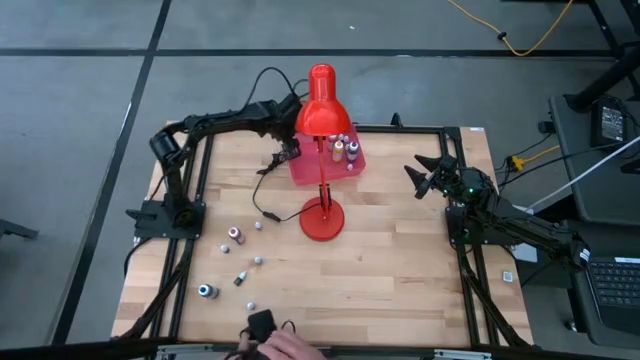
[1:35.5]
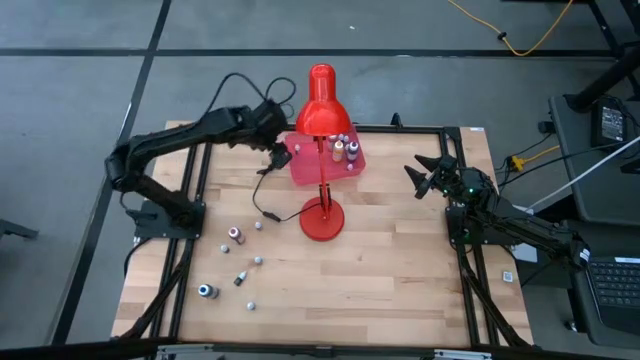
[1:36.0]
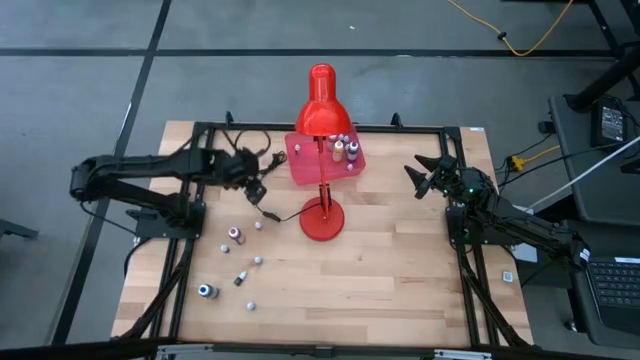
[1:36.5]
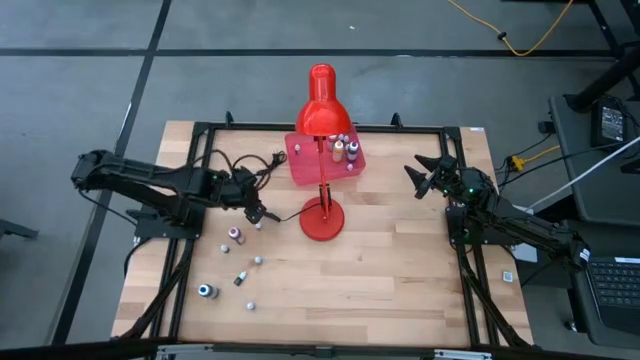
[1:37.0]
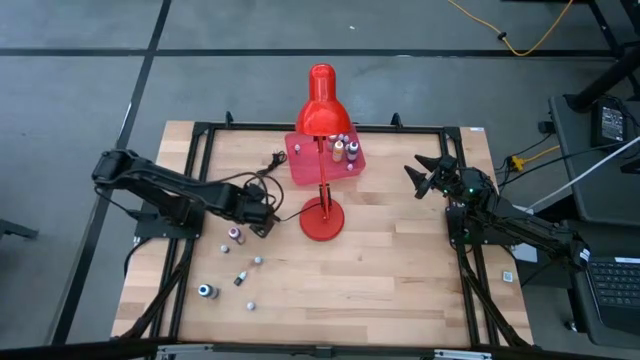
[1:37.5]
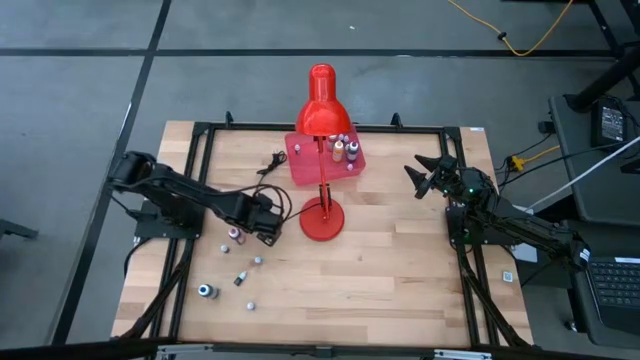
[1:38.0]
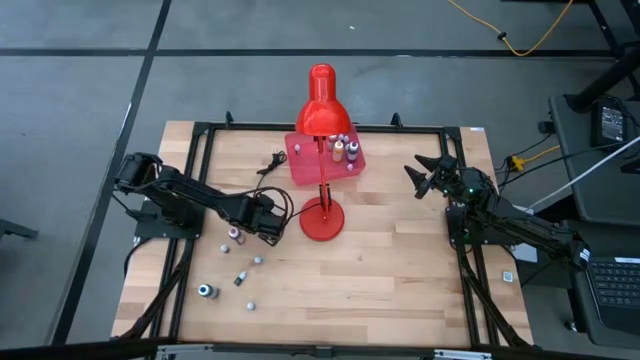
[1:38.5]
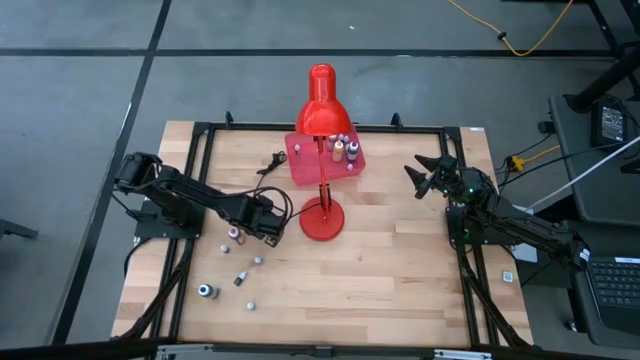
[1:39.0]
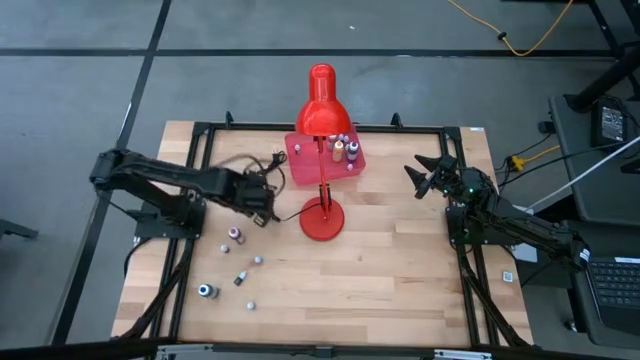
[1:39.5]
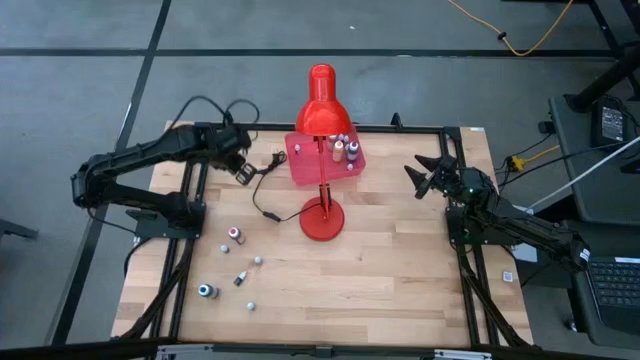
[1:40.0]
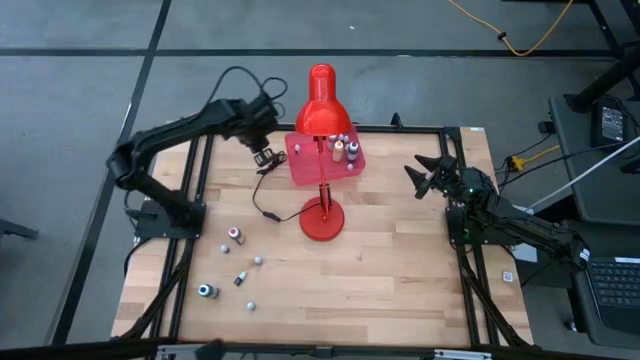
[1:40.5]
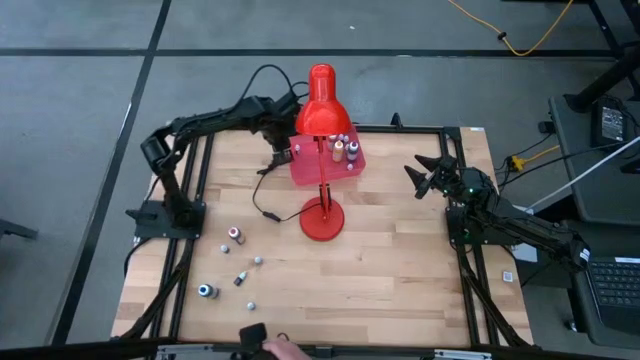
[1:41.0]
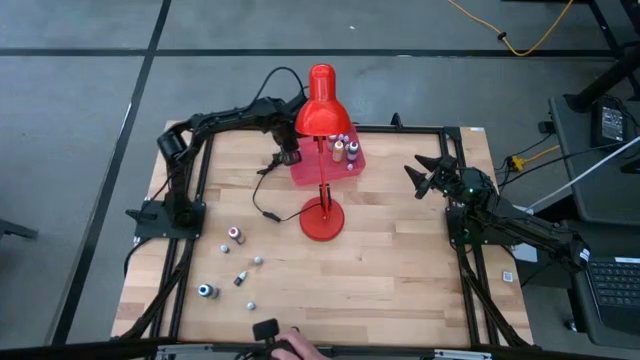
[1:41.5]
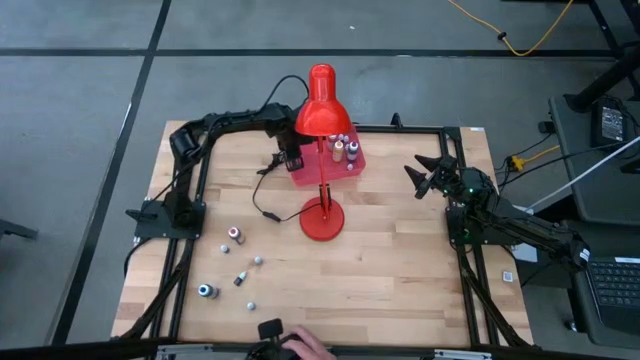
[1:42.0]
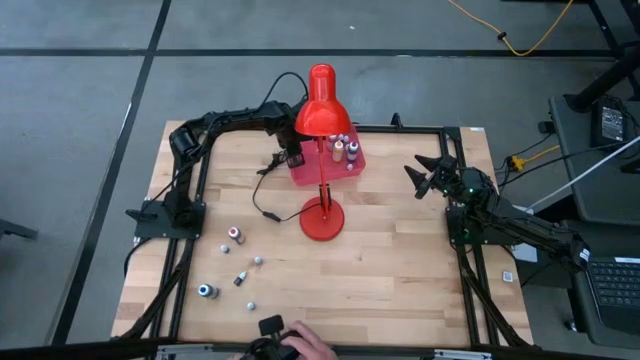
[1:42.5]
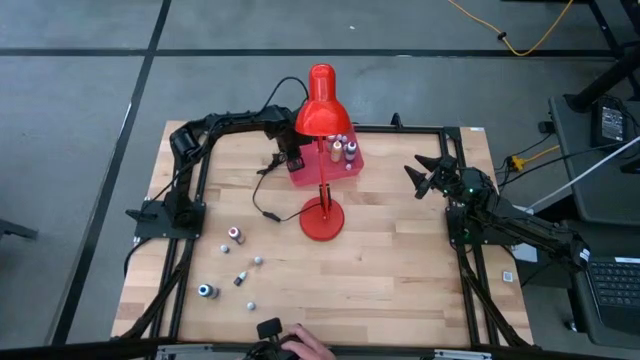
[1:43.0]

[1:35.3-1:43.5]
Task: Pick & Place food coloring
Put the small red food coloring bottle into the red bin

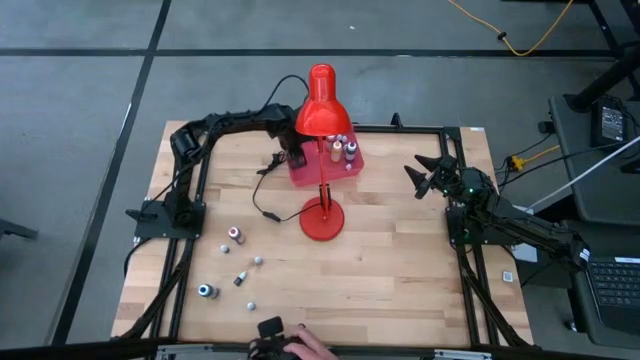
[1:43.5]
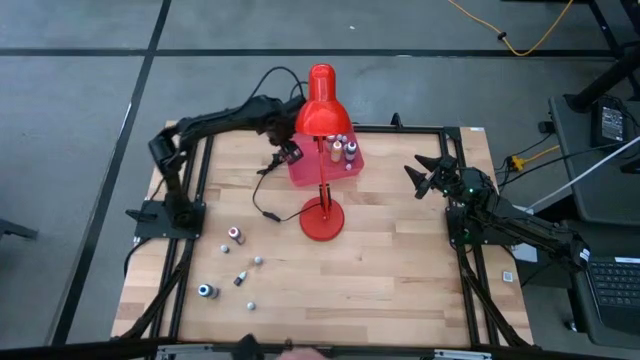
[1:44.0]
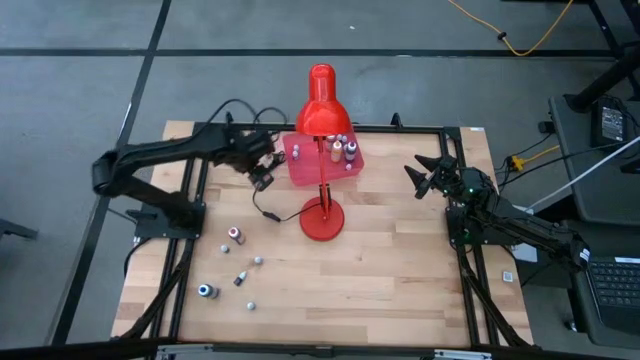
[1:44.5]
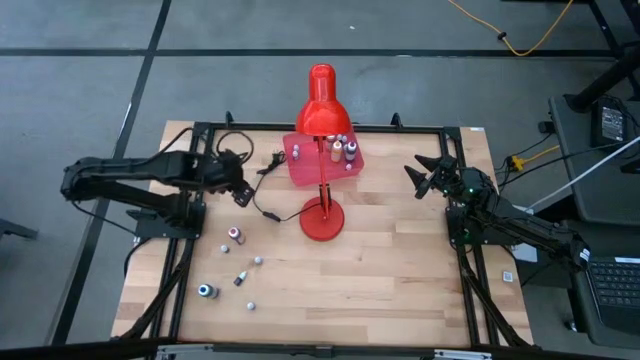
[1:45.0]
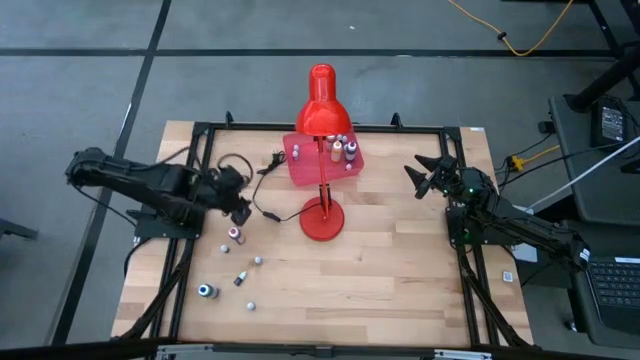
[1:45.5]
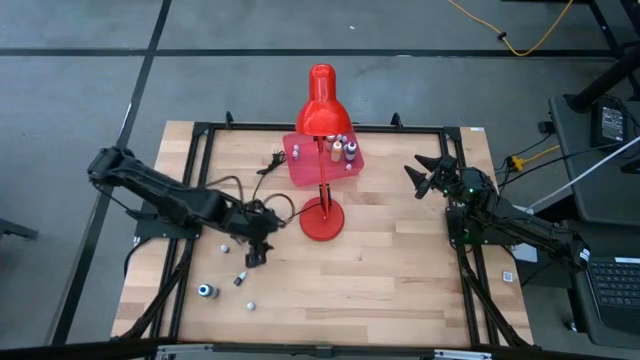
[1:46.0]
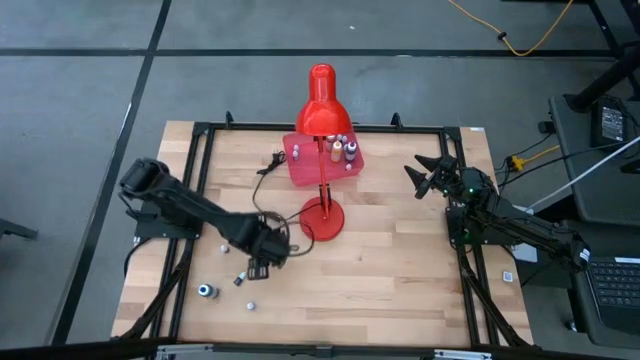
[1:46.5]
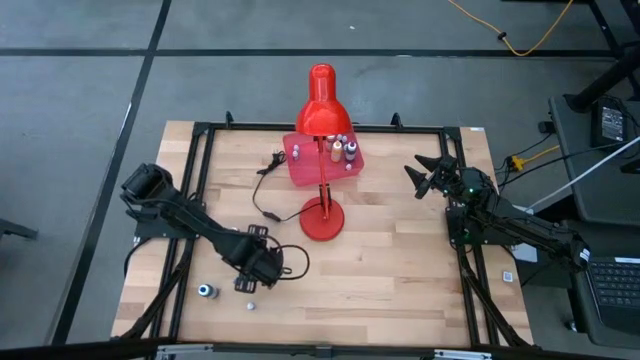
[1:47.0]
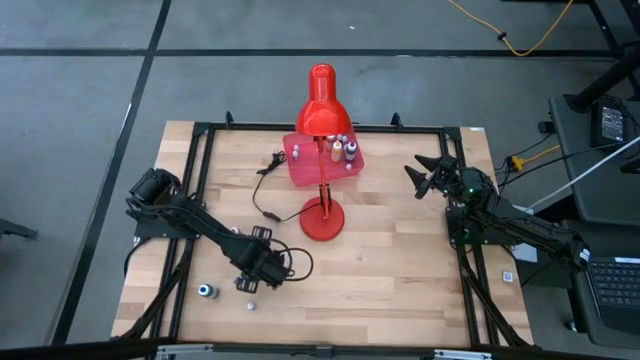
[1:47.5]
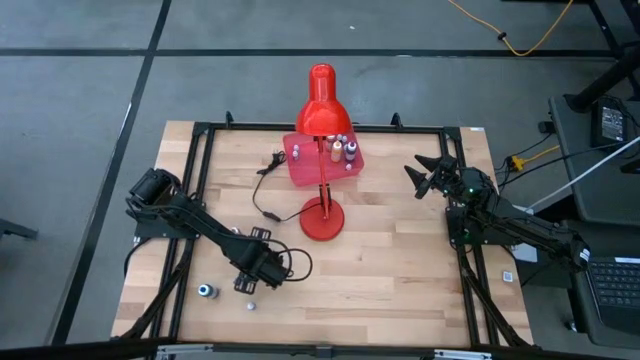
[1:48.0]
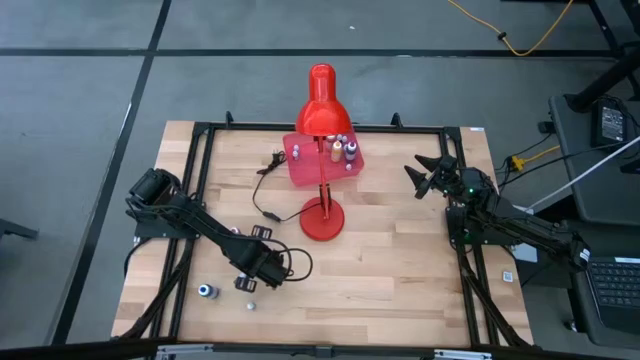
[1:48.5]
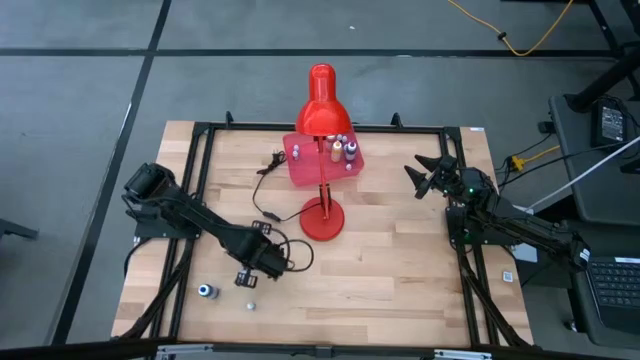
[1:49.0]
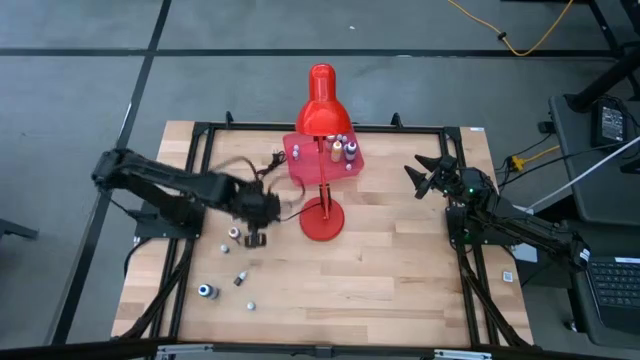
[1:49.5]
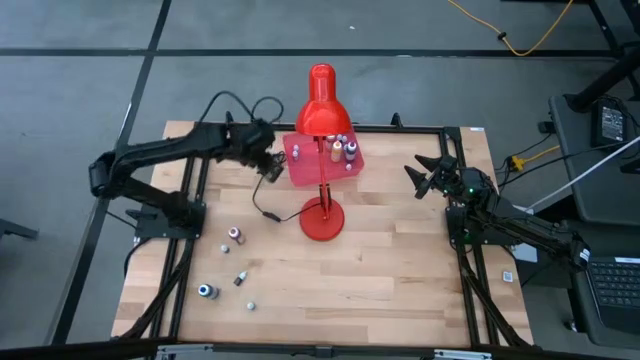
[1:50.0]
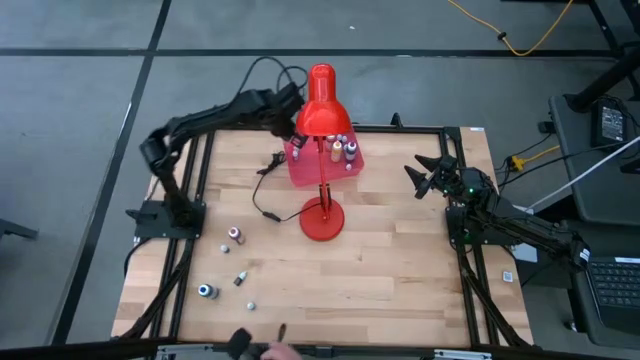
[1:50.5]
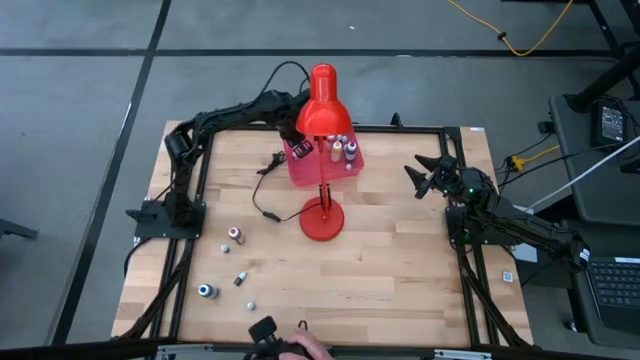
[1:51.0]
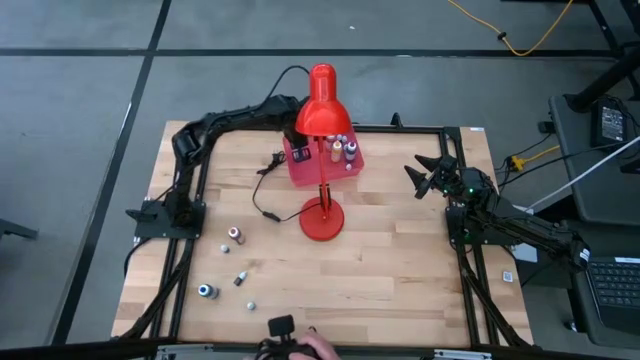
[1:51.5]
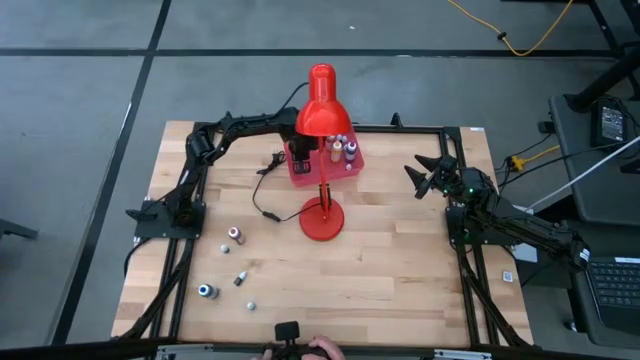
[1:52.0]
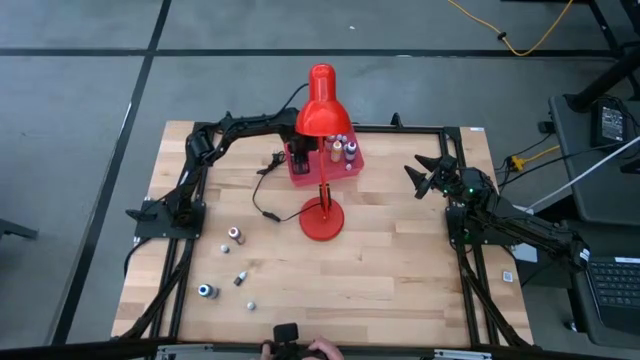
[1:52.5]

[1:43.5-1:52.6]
Put the small blue food coloring bottle into the red bin

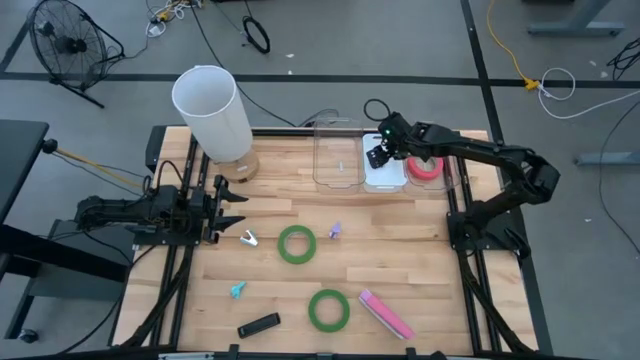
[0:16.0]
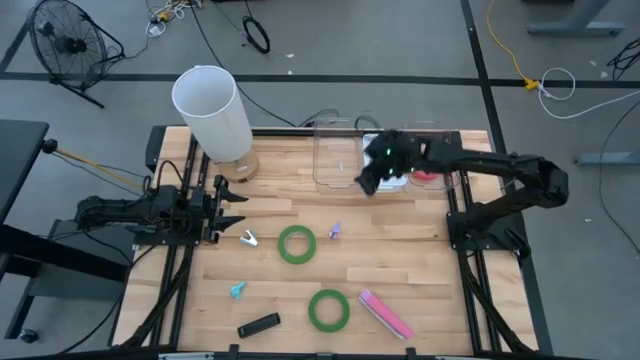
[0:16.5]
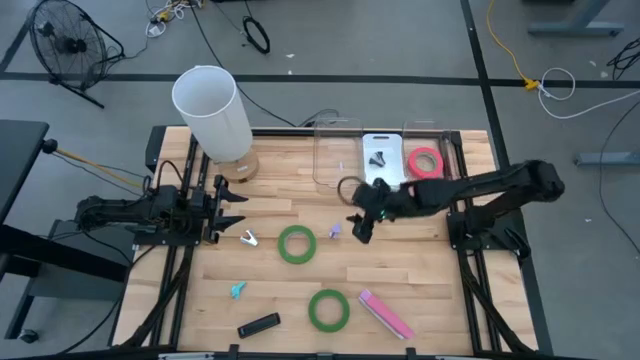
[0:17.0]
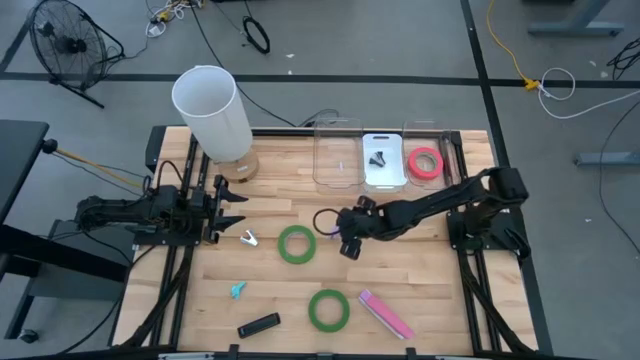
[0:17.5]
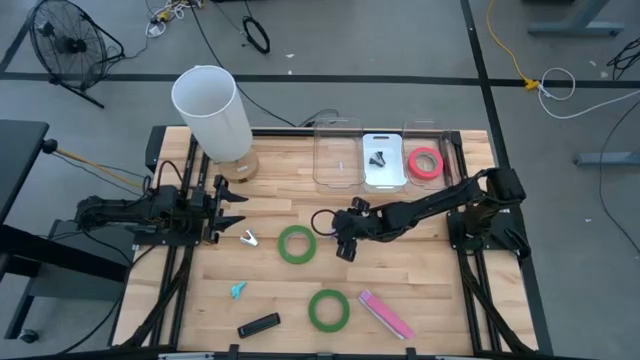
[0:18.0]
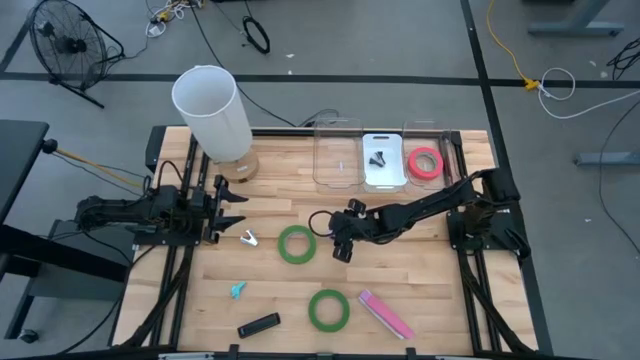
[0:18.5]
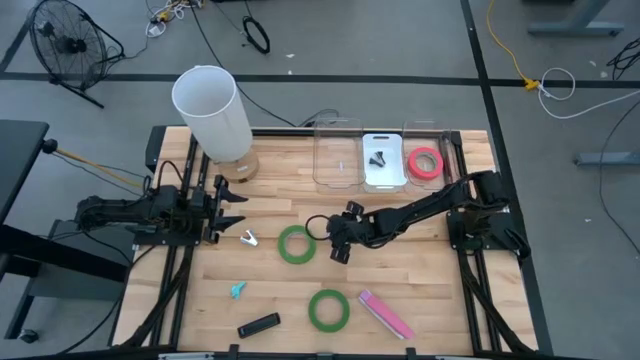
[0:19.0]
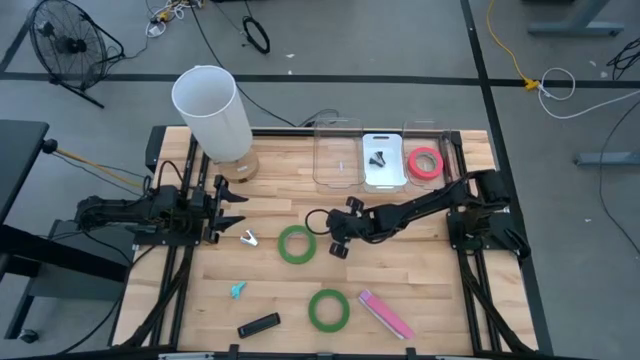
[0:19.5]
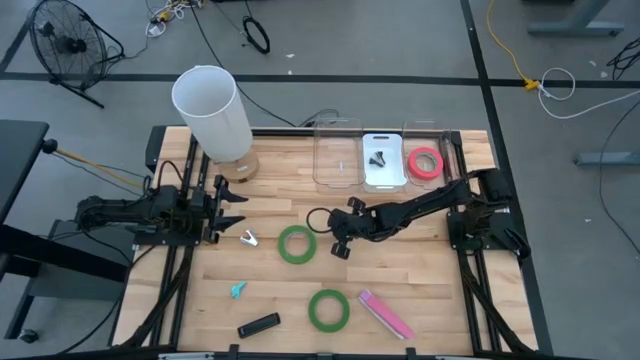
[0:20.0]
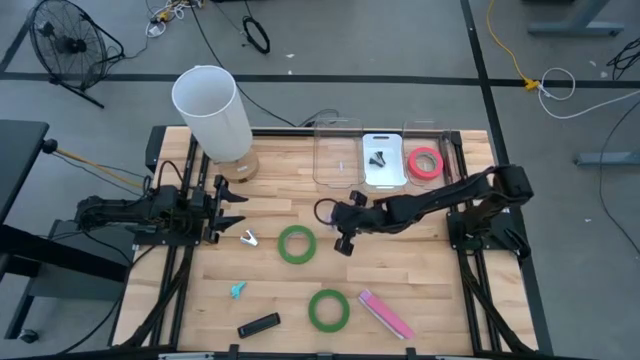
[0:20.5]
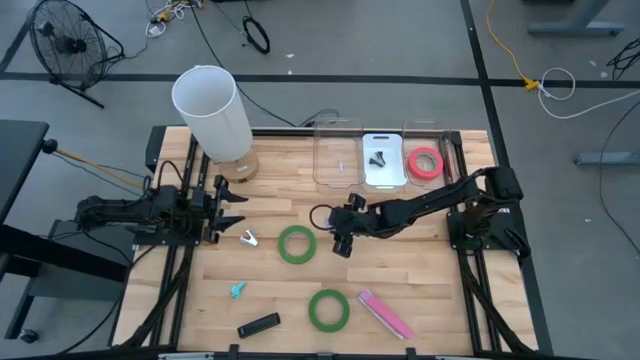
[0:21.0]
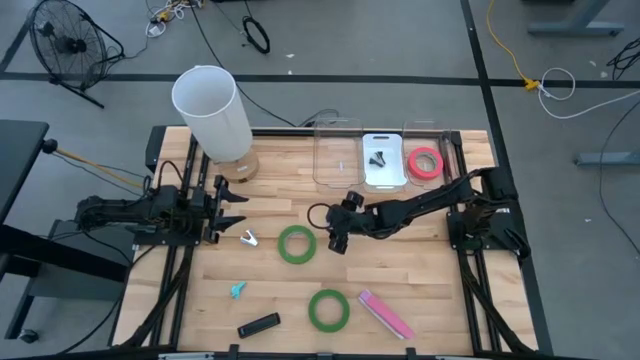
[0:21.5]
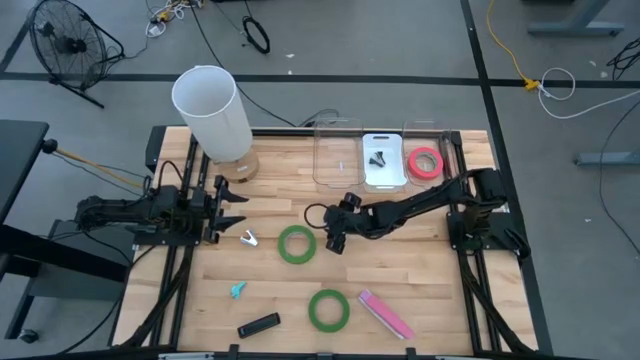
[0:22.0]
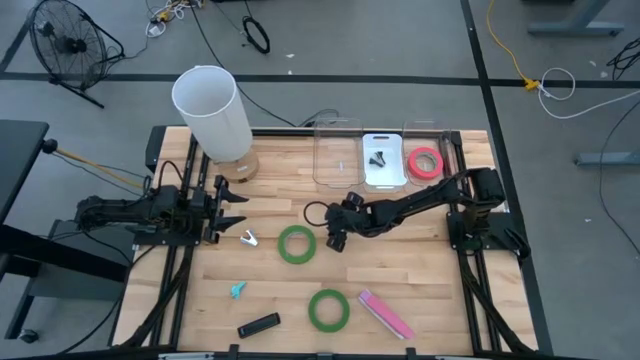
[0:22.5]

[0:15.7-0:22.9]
Task: Pick and place Stapler, Stapler remover, tape
Put the violet staple remover into the white bin
